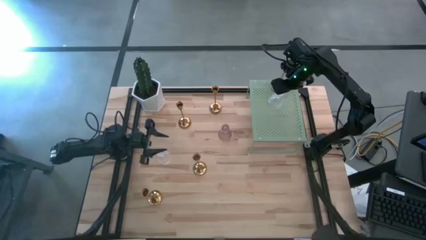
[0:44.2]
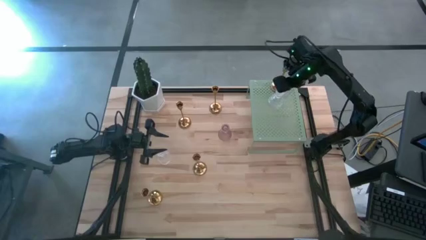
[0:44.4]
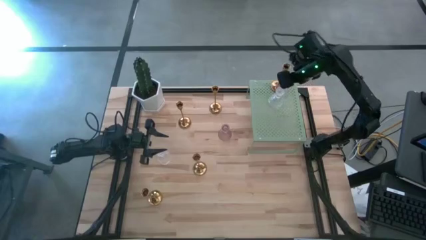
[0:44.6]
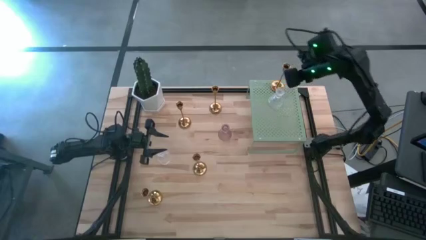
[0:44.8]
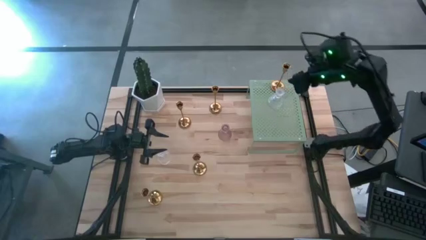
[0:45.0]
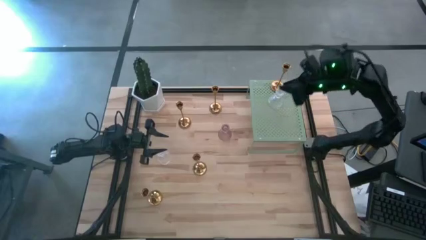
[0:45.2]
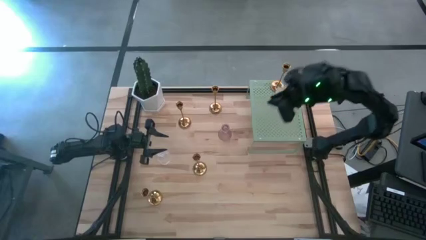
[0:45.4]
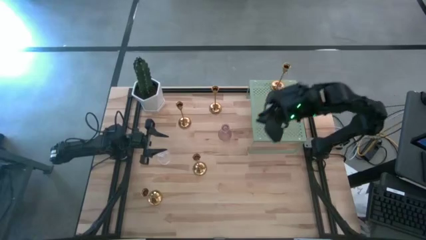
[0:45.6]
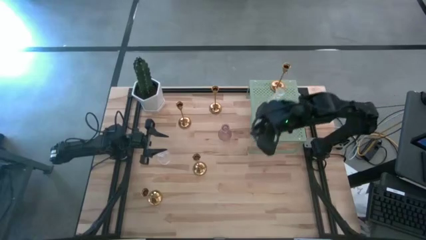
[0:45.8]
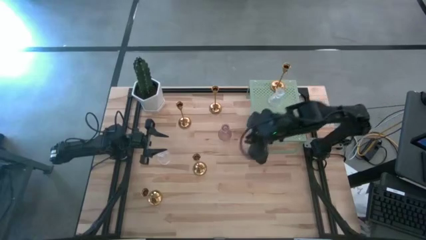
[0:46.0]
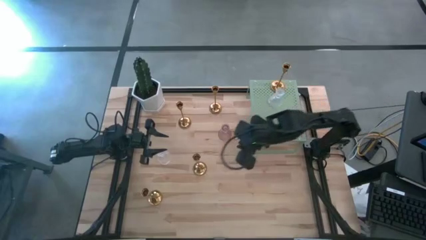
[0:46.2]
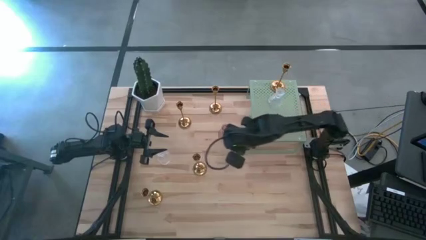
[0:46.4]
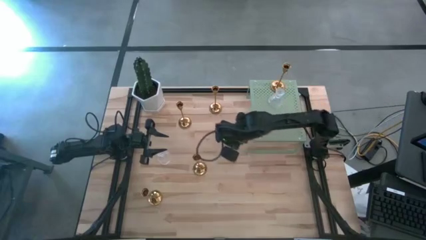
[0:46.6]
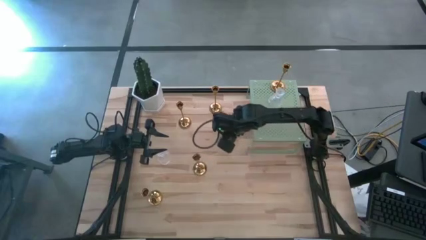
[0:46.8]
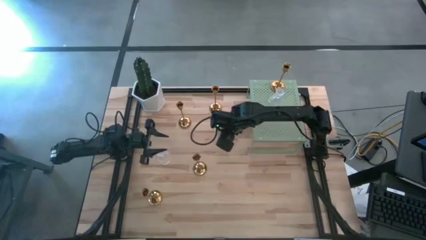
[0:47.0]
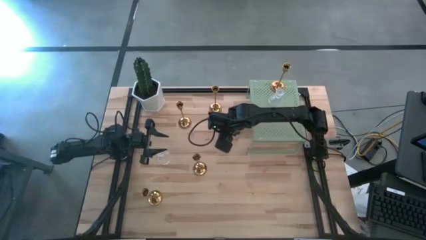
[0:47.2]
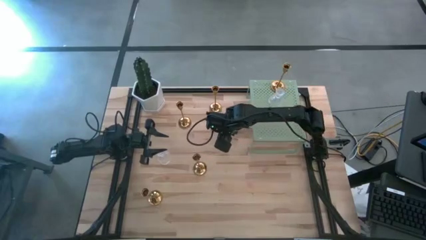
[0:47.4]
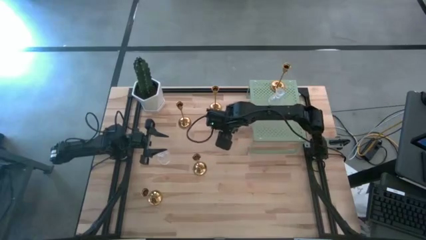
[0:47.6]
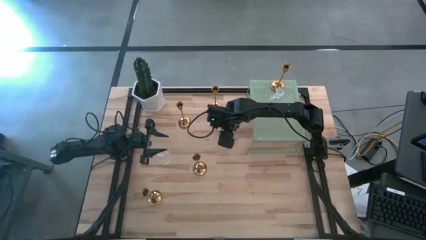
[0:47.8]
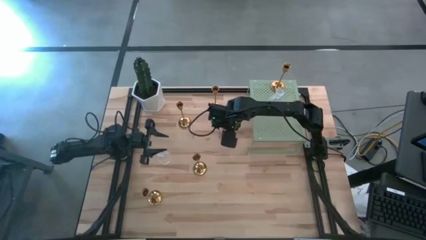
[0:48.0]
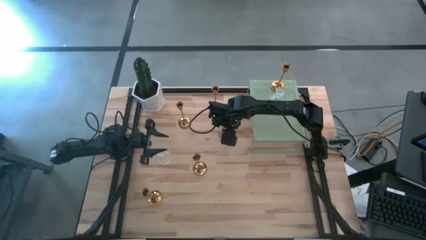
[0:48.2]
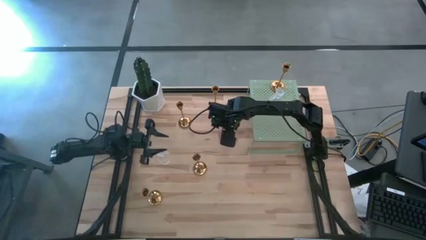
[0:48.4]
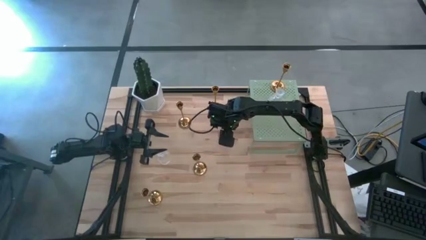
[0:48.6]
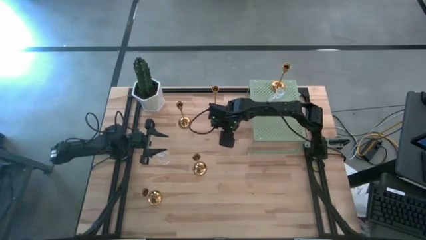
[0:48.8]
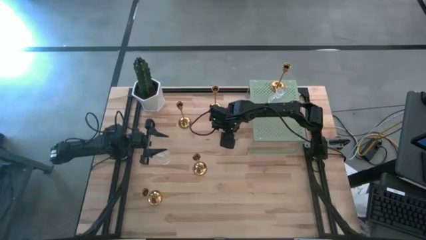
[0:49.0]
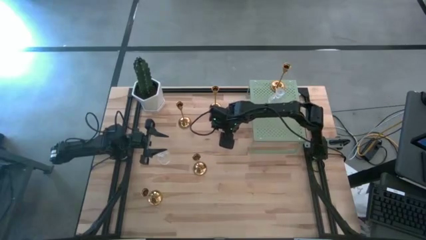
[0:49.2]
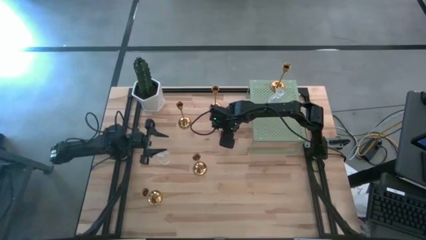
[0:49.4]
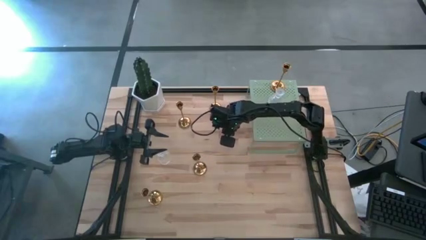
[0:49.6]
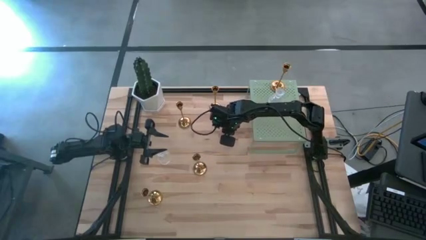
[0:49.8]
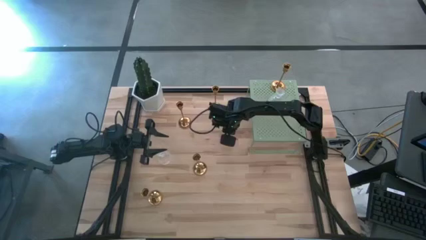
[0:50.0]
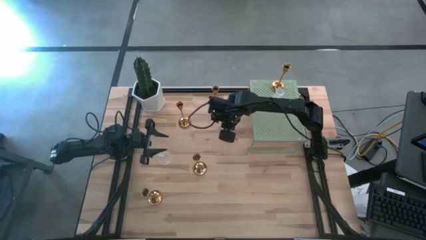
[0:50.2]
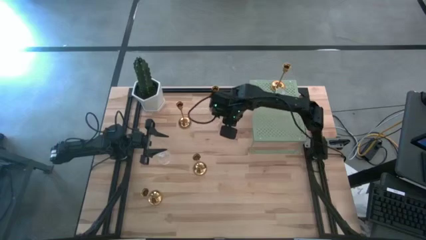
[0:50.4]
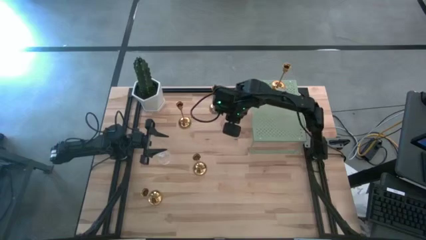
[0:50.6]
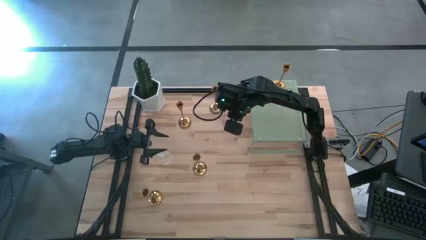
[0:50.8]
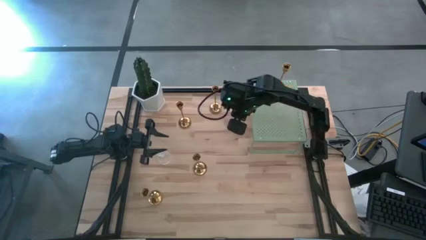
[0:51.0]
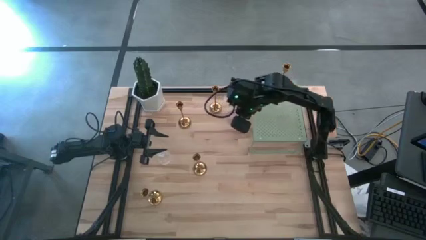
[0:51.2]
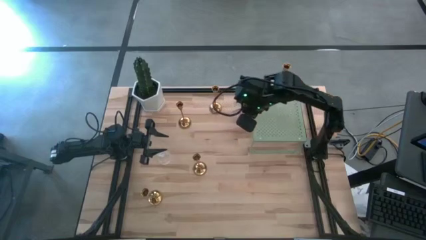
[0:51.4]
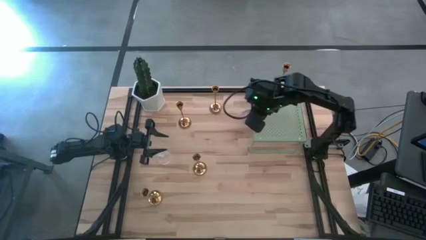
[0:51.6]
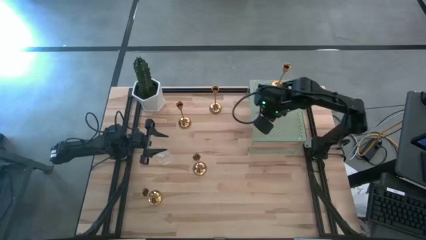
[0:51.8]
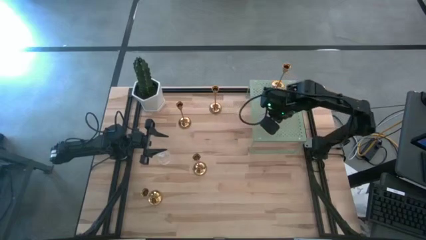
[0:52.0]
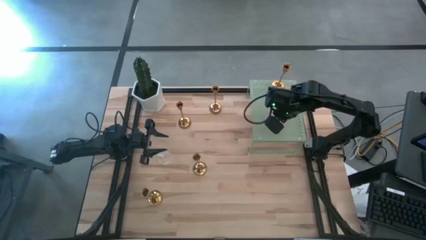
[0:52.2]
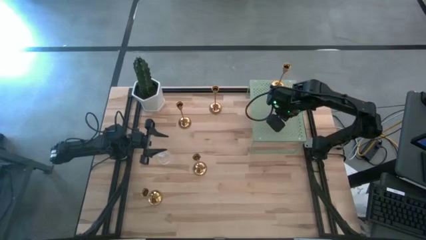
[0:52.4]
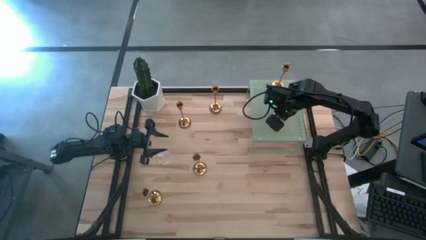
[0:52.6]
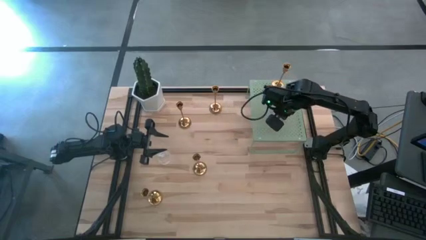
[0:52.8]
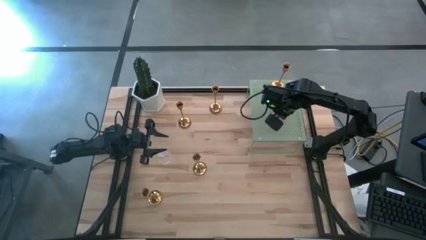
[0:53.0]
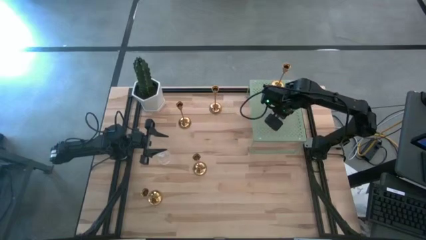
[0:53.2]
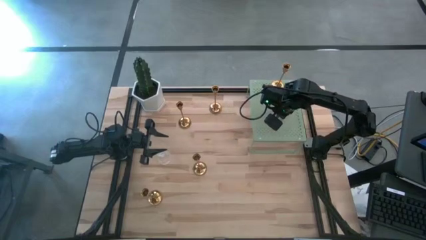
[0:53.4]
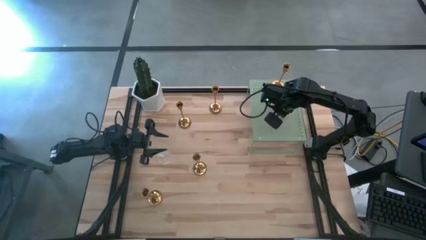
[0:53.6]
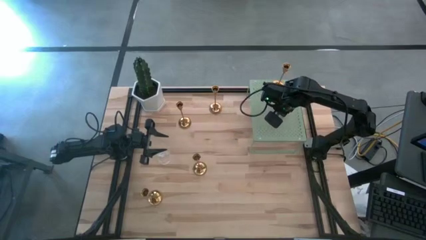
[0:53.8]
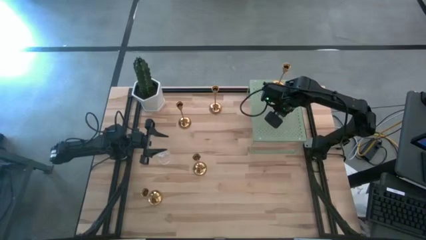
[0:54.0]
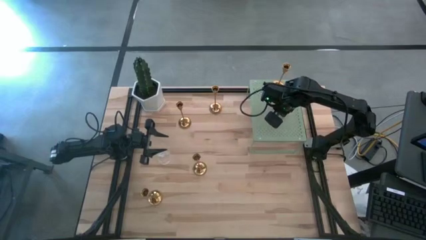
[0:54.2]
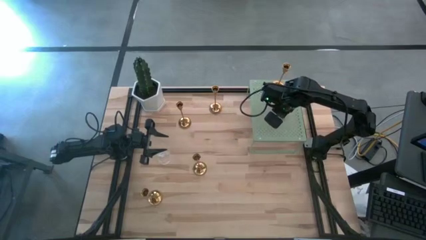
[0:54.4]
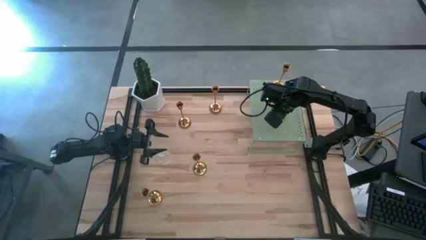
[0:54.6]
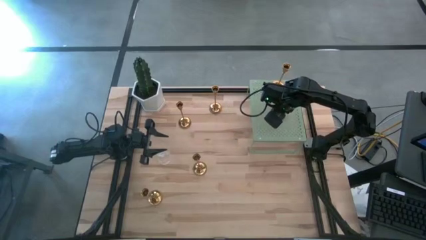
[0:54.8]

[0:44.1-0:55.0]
Task: Pick & Place candle stick holders
Put the pink glass candle holder on the shelf

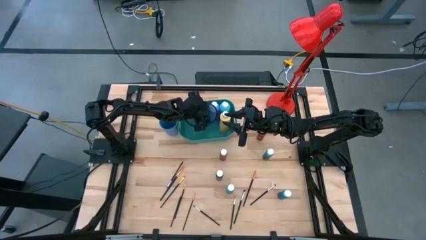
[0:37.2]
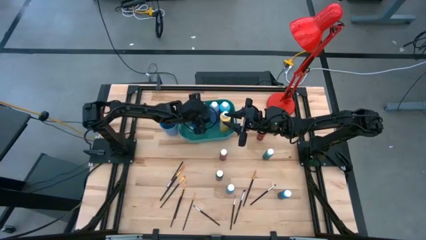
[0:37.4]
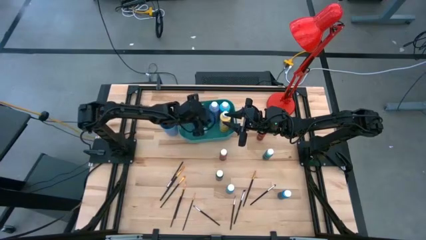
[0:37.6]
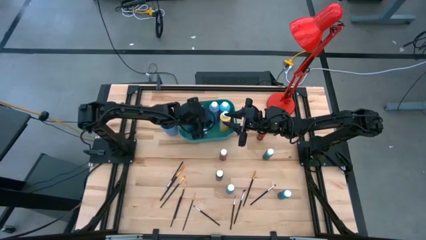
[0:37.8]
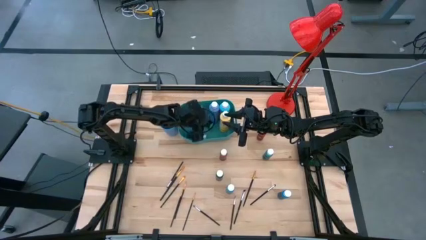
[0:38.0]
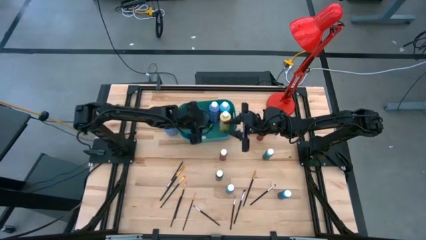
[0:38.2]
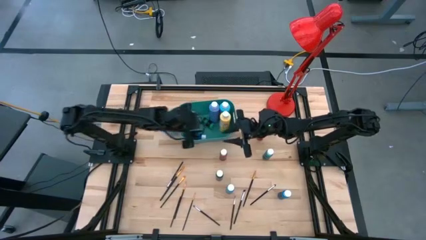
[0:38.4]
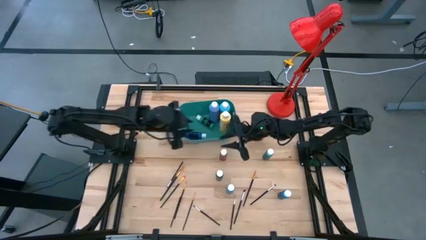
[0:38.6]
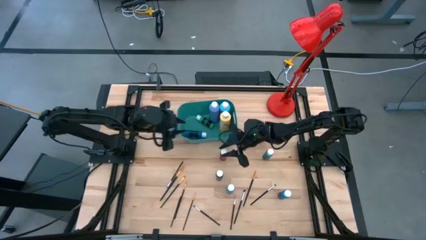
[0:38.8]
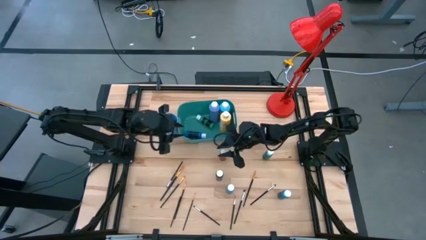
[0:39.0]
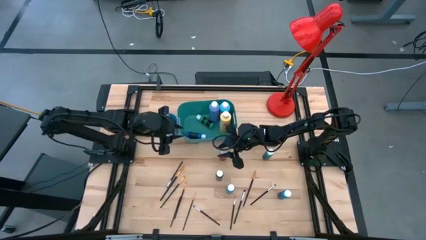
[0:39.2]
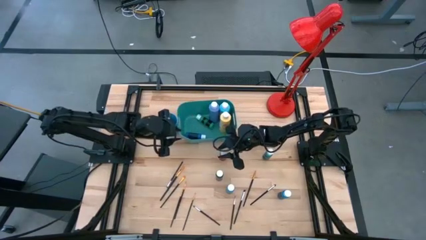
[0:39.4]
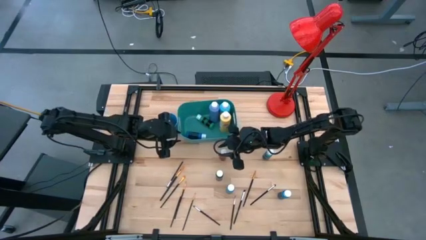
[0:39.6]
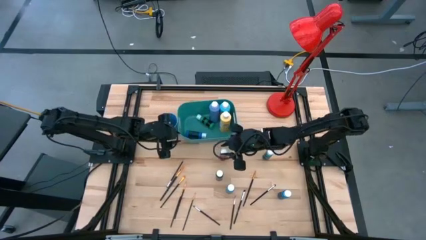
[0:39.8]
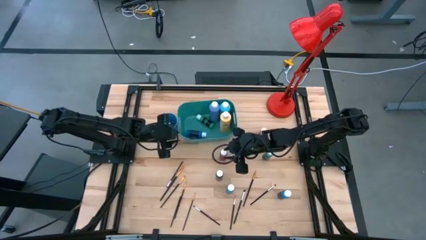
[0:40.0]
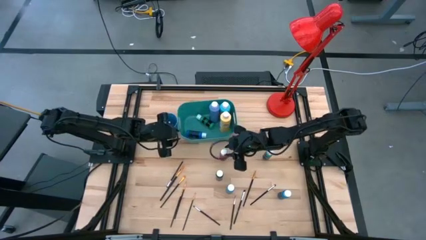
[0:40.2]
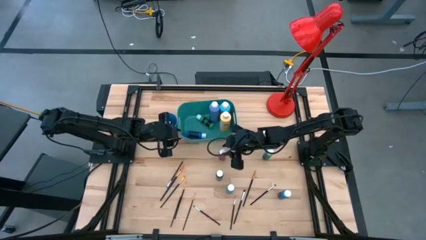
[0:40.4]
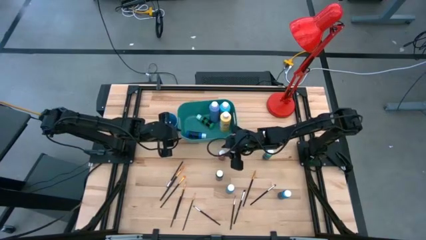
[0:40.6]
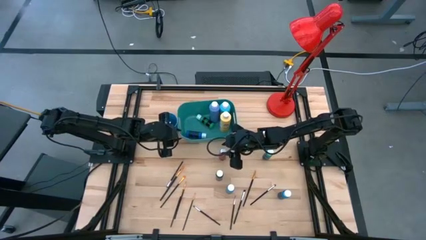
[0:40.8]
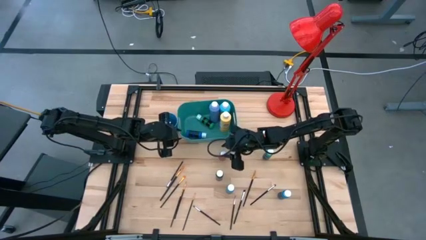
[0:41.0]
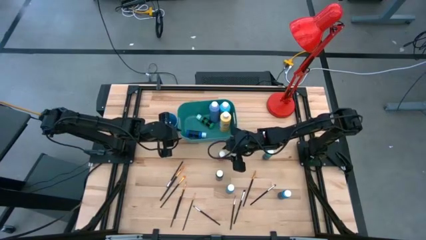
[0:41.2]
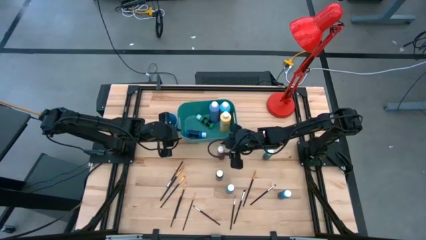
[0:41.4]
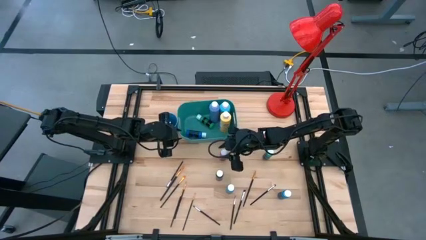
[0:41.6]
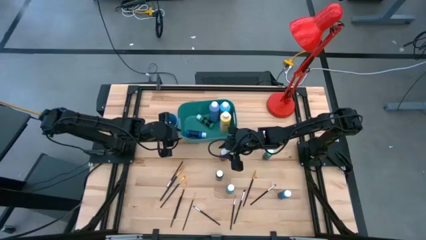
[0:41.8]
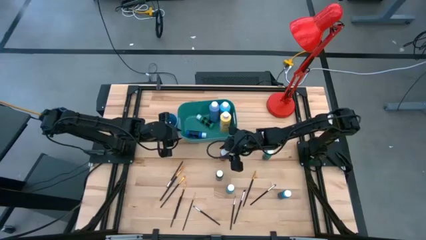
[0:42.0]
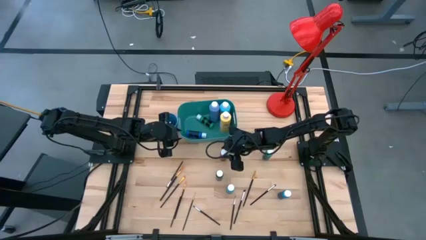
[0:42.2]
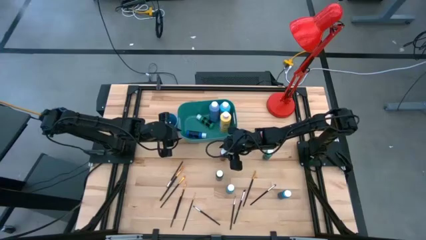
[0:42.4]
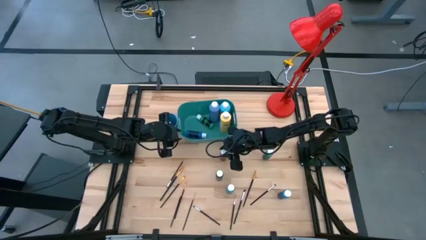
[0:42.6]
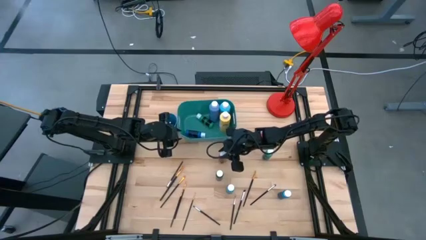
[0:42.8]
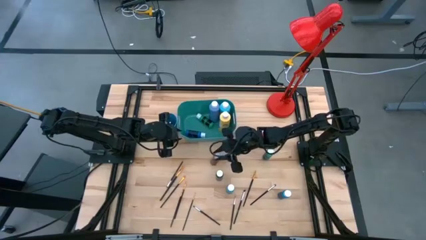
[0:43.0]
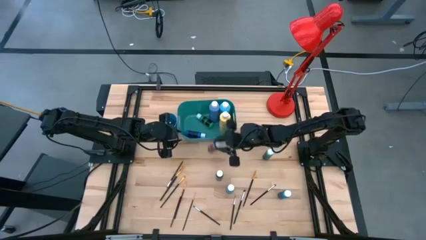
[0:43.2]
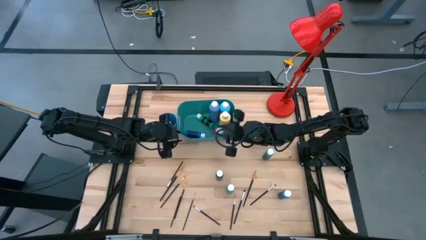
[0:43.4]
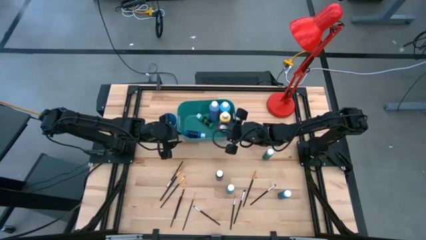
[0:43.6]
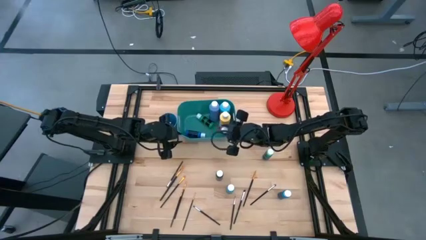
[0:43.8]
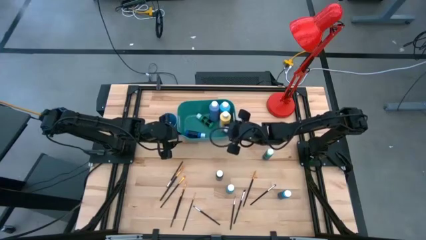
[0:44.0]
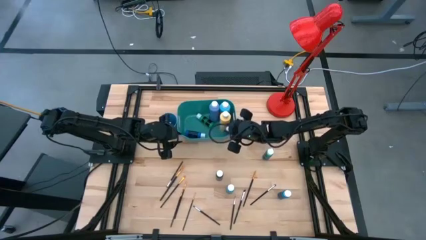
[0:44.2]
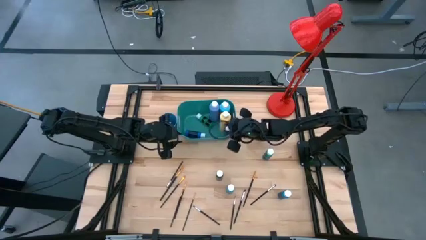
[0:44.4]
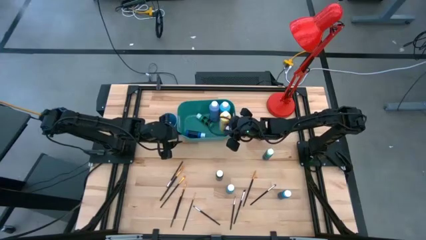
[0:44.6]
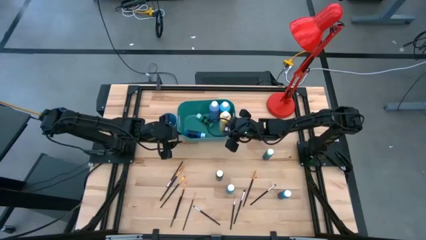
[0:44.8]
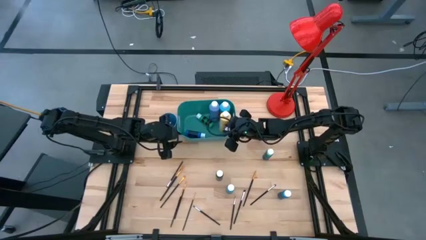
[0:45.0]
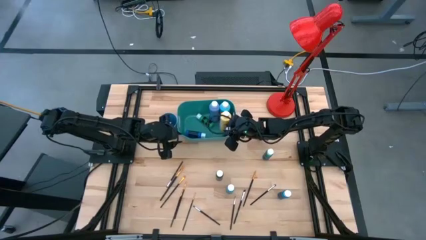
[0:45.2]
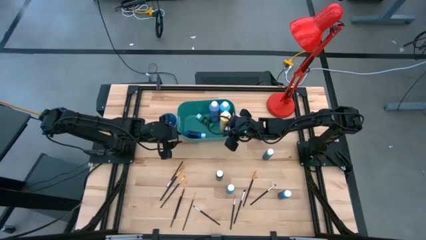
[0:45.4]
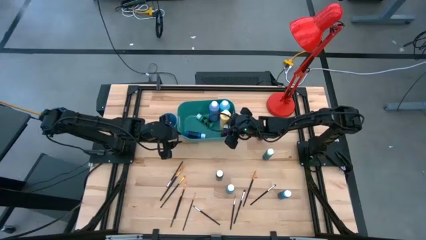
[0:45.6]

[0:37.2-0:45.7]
Task: Pick & Place Paint Supplies
Put the left small red paint bottle into the green bin
